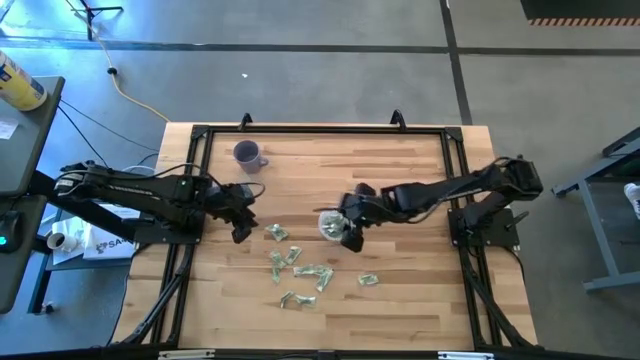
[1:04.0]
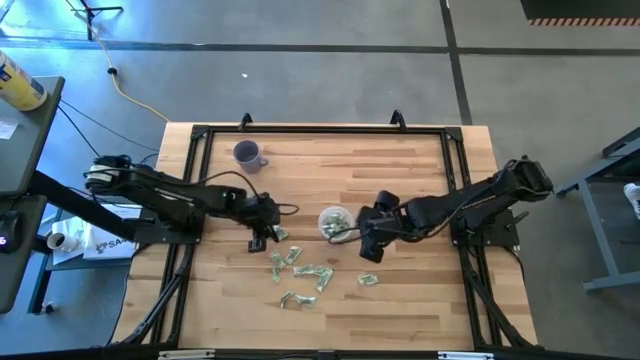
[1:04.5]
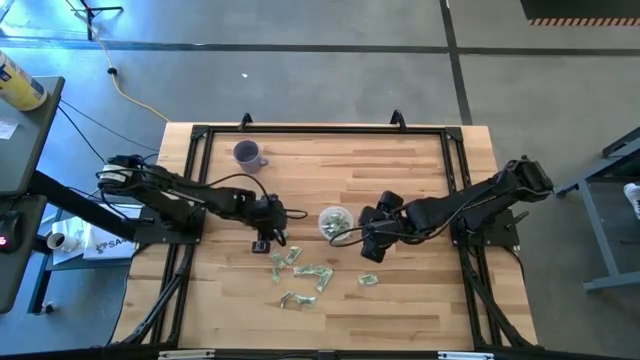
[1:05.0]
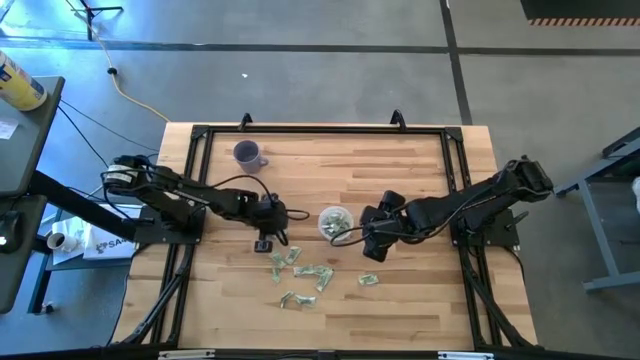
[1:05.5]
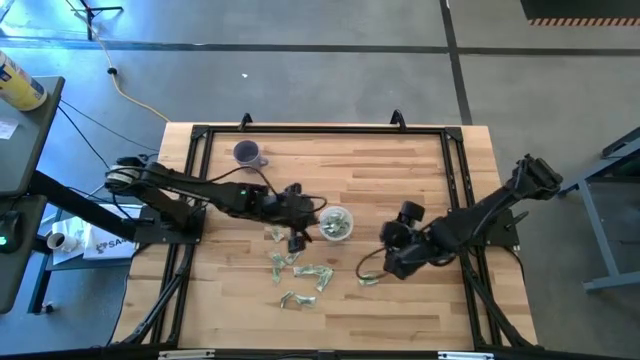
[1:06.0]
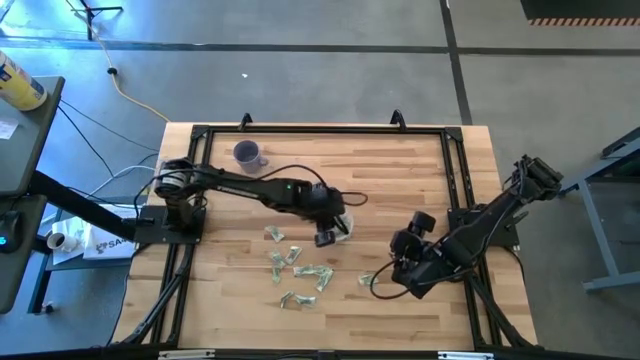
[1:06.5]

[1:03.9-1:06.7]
Task: Pick and place Stevia / Truvia into bins
Put the stevia packet into the transparent container

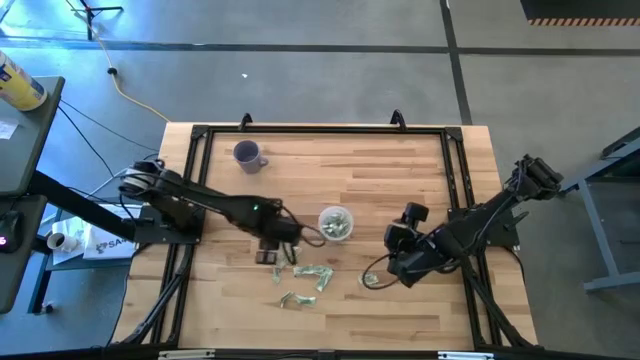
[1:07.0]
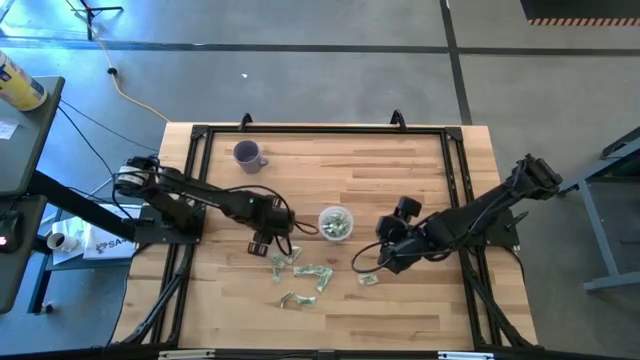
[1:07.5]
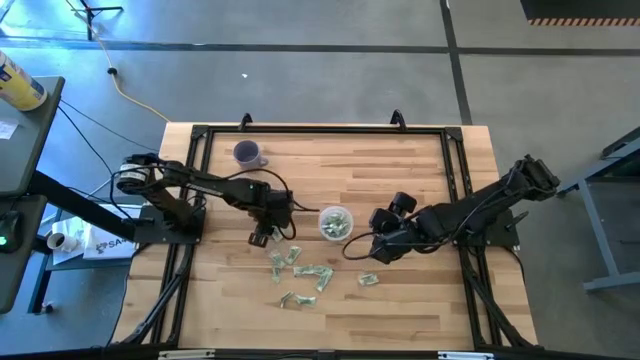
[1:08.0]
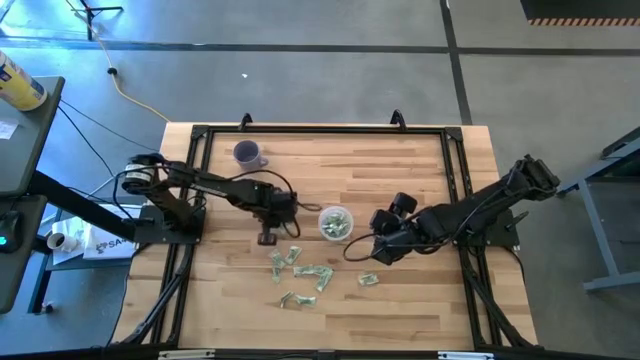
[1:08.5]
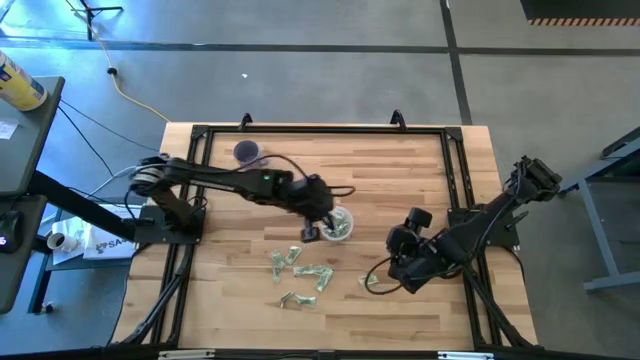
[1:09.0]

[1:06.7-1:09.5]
Put the stevia packet into the transparent container

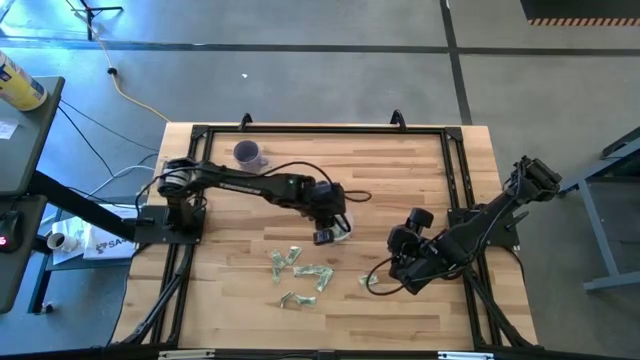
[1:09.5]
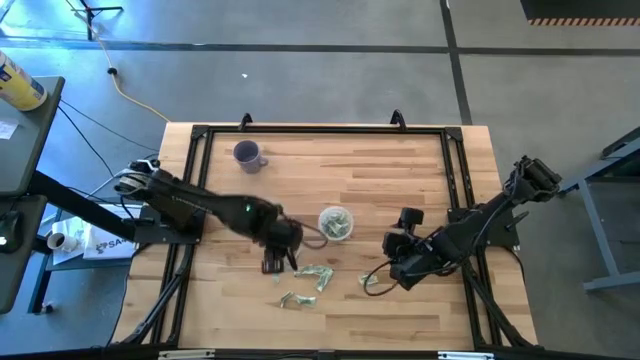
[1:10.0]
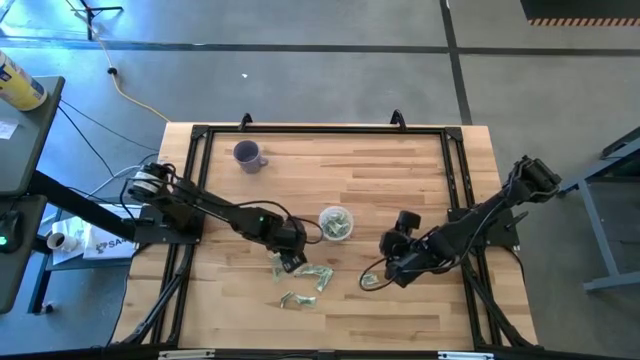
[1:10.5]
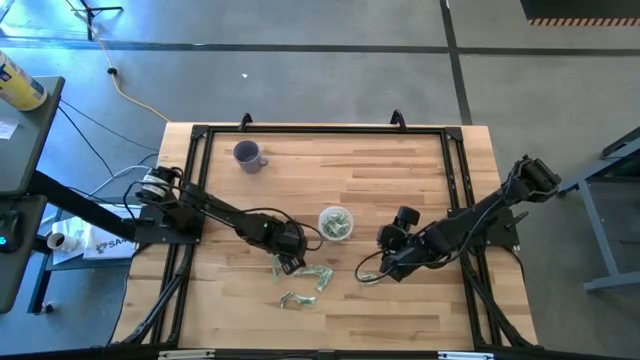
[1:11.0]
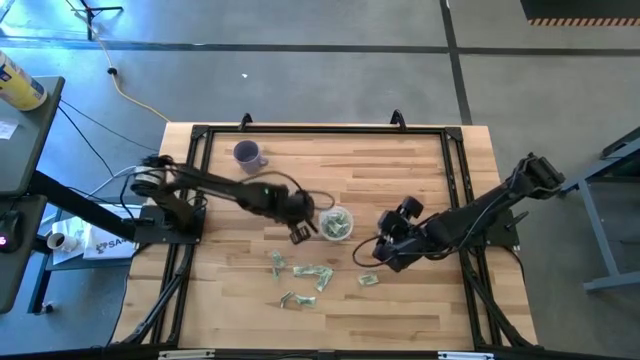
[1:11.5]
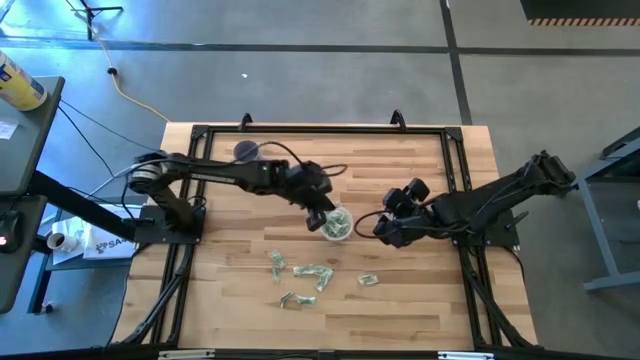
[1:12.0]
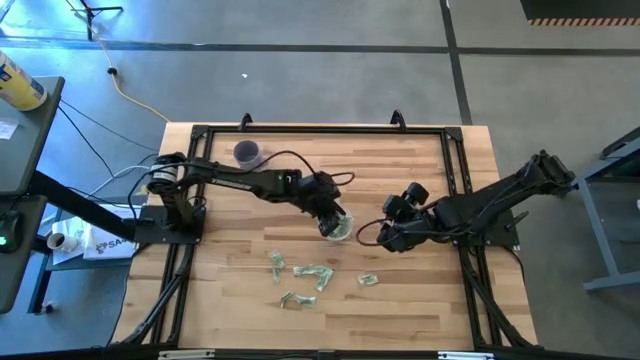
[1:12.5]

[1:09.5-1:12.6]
Put the stevia packet into the transparent container

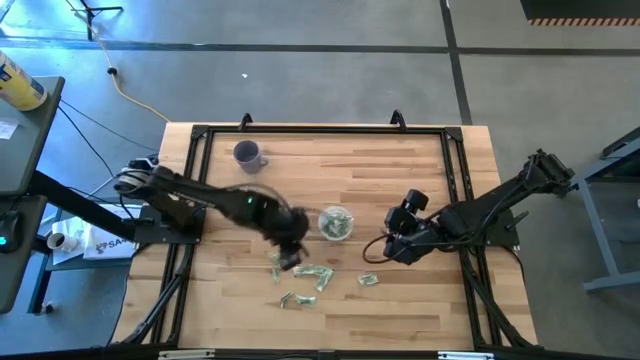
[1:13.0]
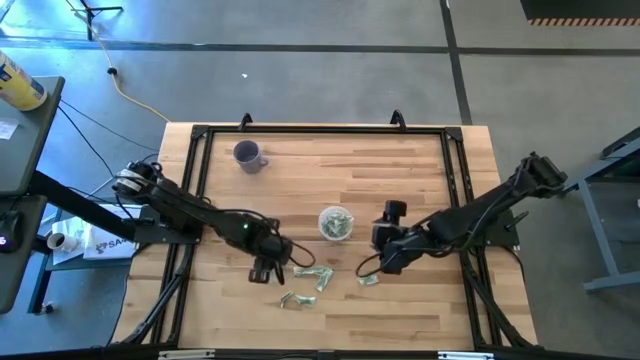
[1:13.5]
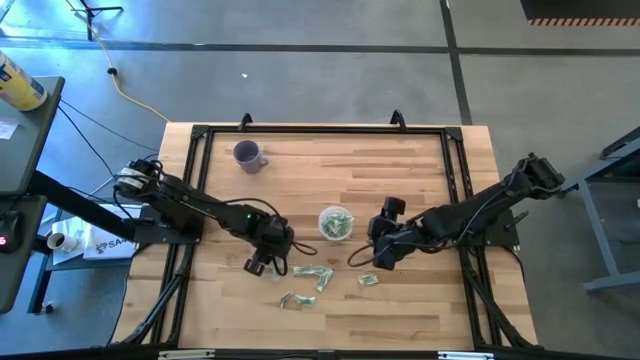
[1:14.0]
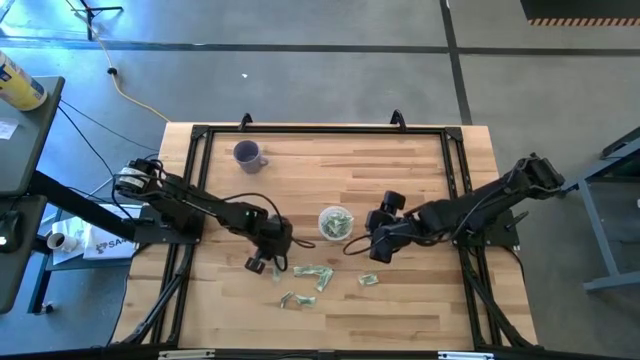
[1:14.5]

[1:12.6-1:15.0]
Put the stevia packet into the transparent container

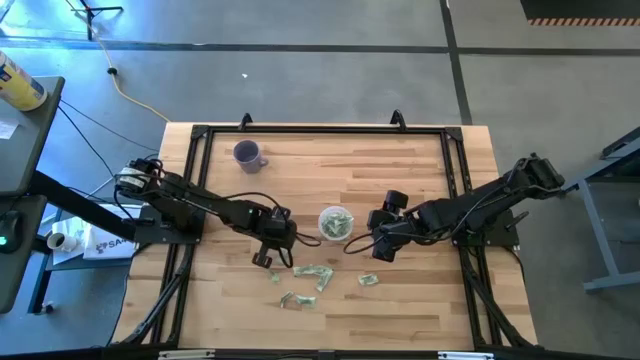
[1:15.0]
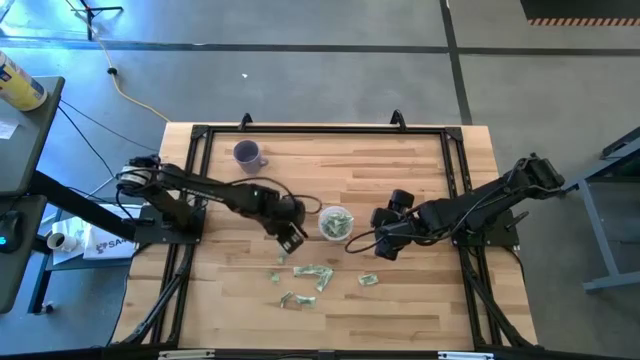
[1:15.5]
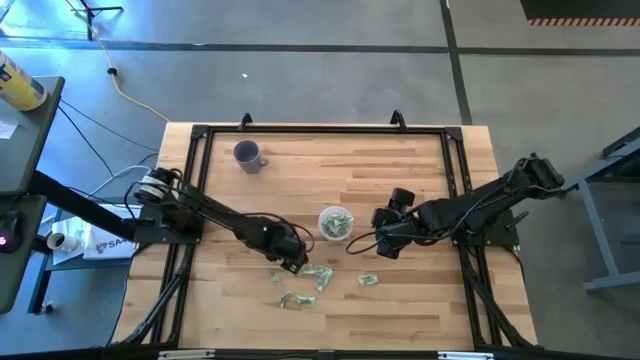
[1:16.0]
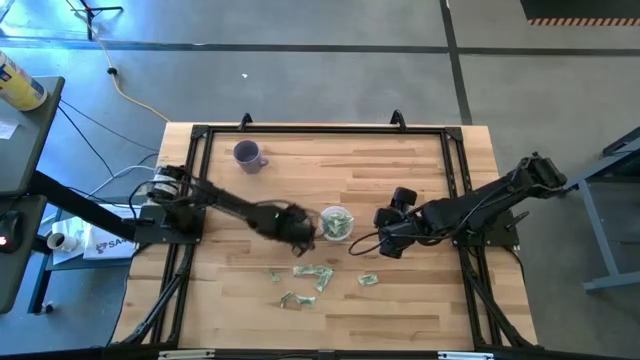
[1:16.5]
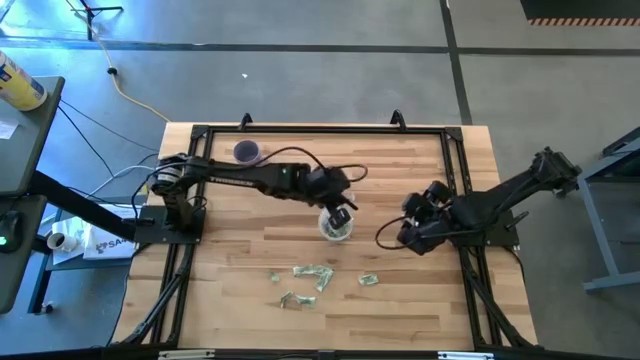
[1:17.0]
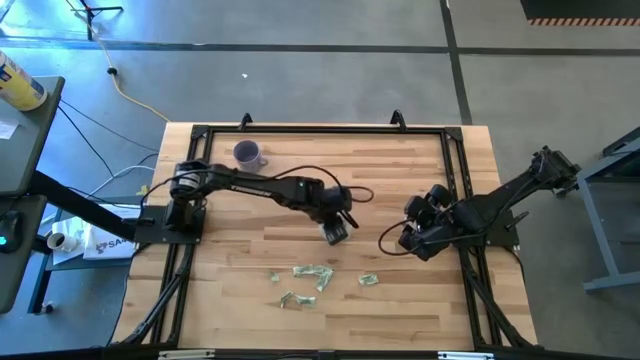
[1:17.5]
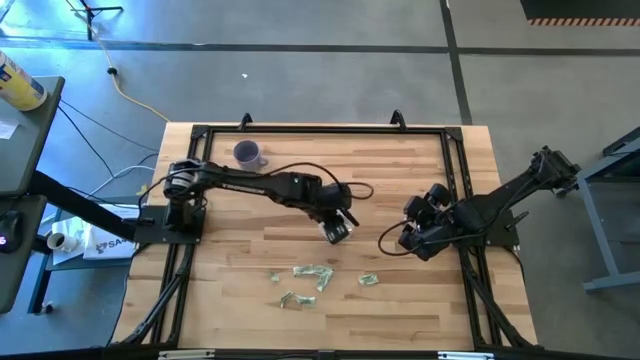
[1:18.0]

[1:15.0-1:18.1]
Put the stevia packet into the transparent container

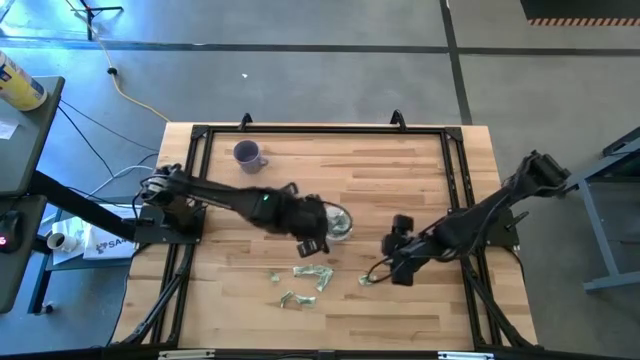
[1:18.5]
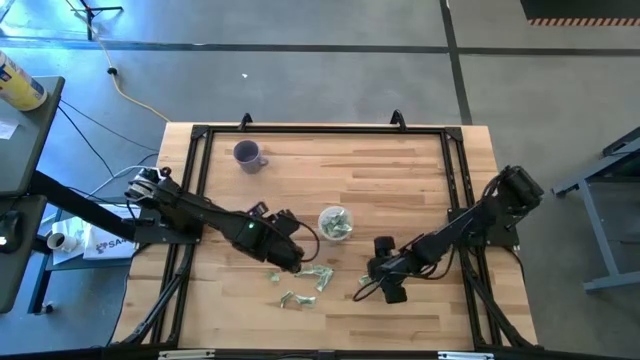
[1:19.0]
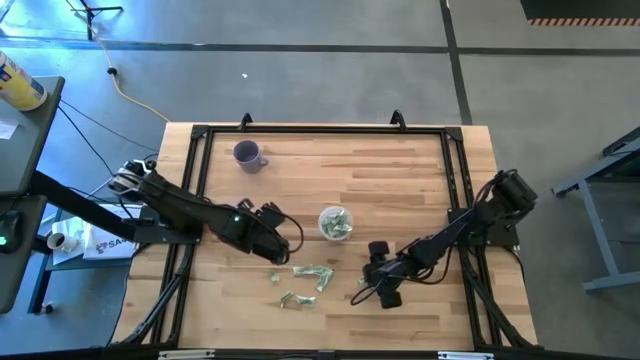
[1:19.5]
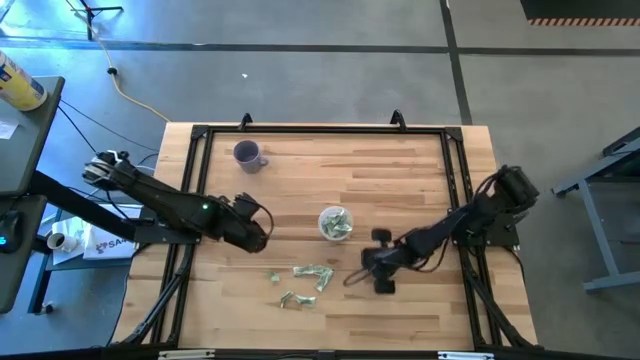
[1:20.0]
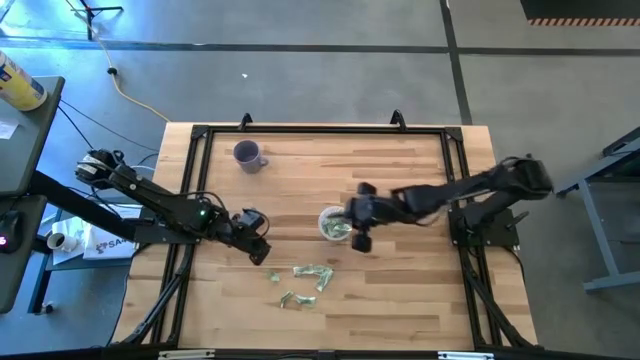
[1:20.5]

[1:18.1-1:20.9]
Put the stevia packet into the transparent container

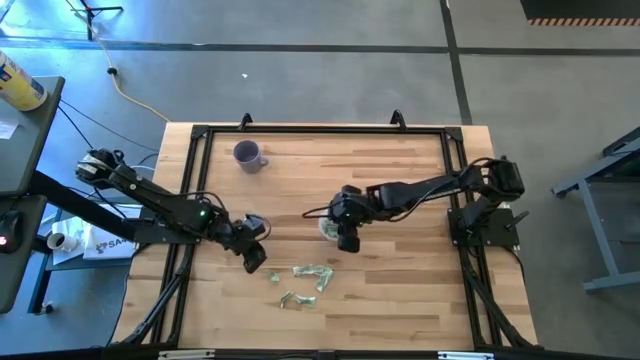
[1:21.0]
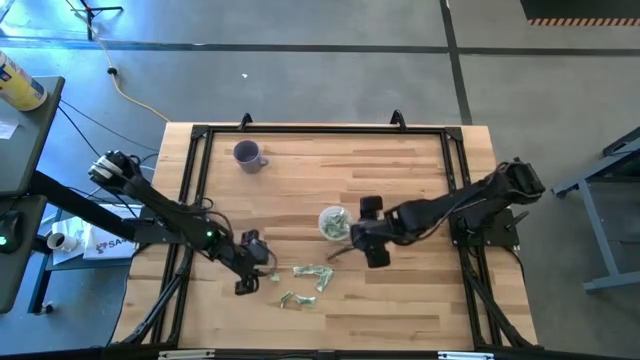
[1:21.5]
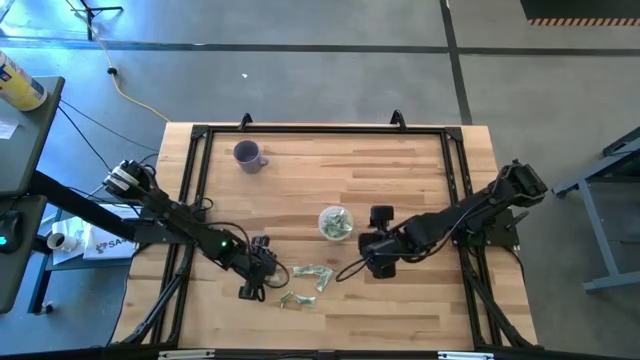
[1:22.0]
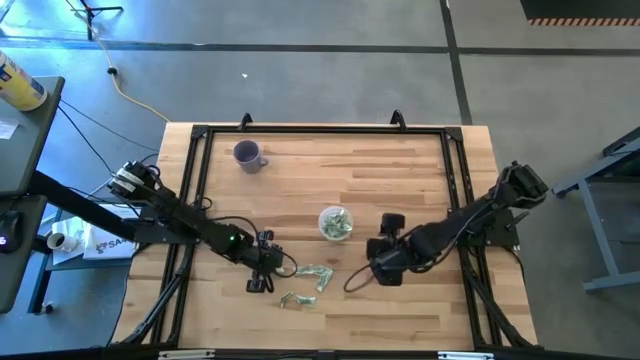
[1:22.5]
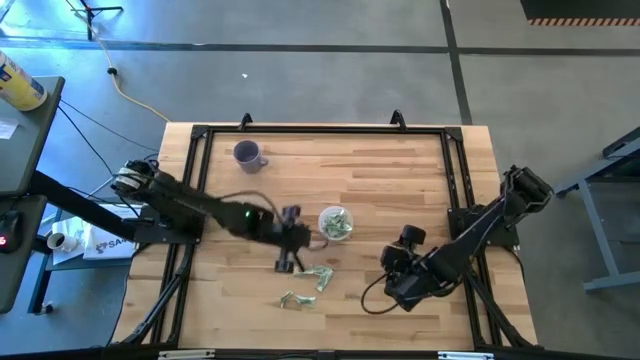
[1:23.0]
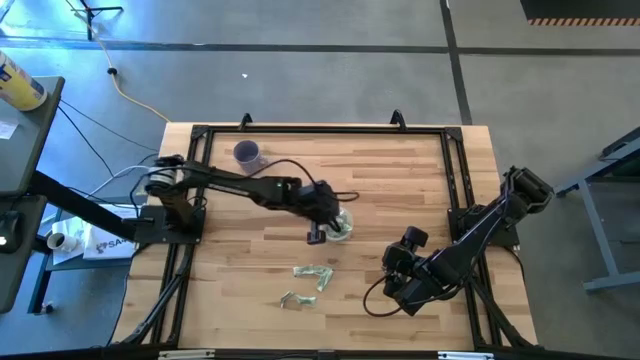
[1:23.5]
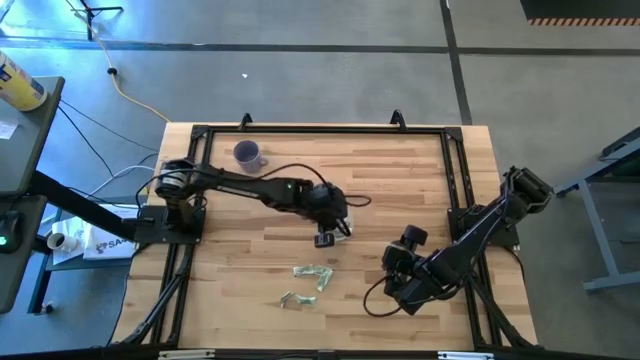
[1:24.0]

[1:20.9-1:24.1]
Put the stevia packet into the transparent container

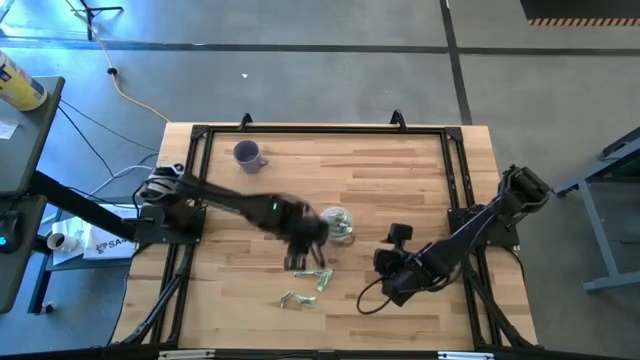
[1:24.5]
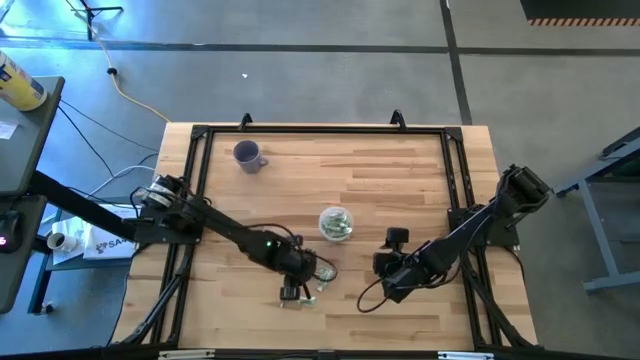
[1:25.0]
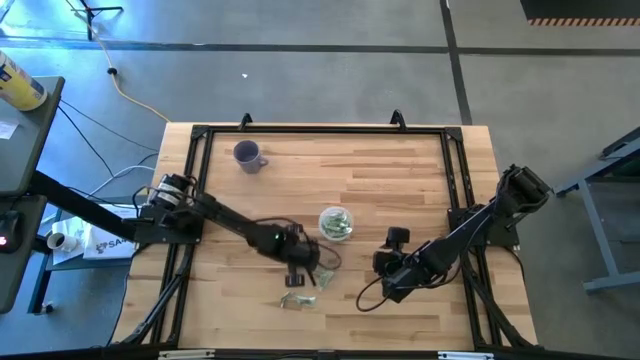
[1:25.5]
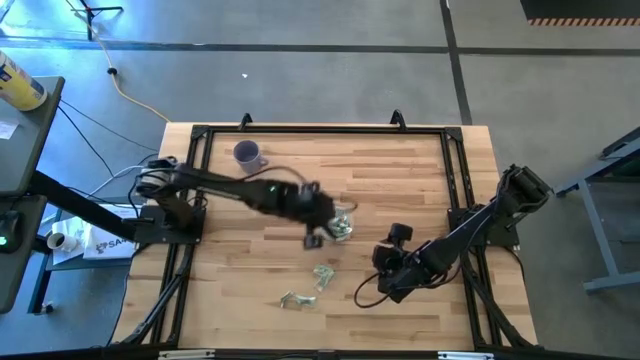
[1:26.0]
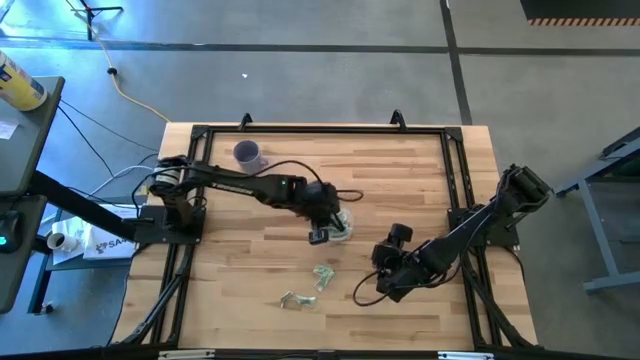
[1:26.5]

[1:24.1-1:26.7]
Put the stevia packet into the transparent container
